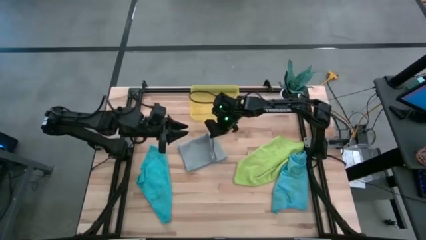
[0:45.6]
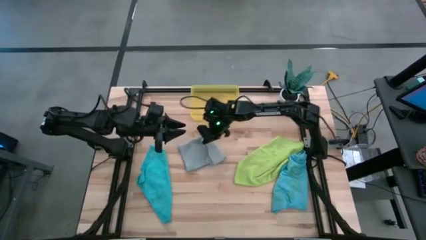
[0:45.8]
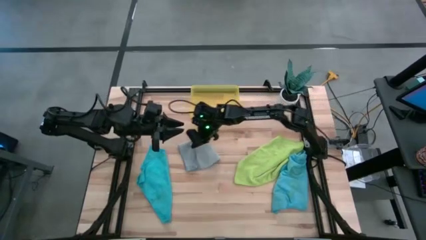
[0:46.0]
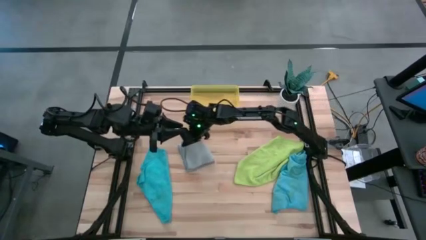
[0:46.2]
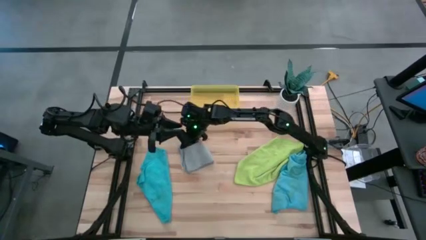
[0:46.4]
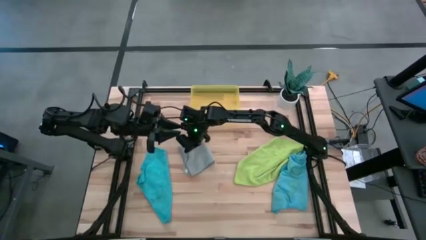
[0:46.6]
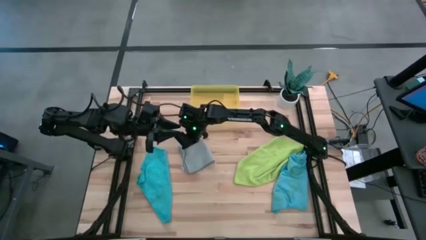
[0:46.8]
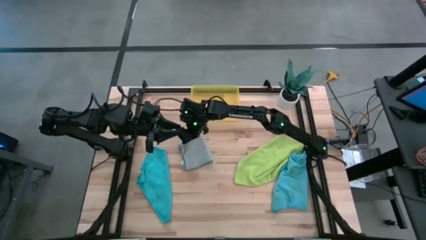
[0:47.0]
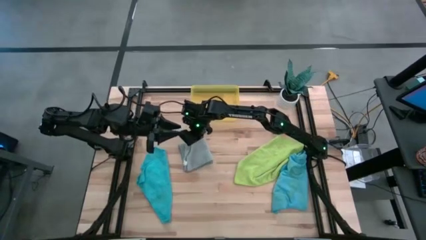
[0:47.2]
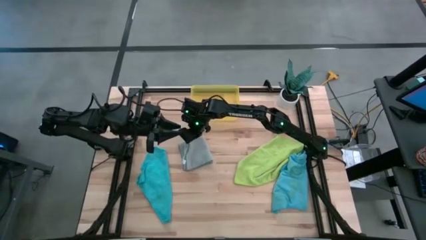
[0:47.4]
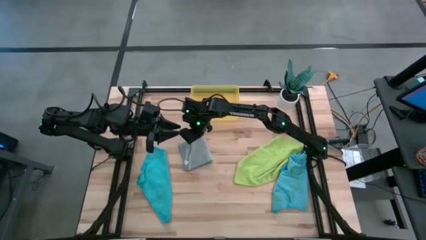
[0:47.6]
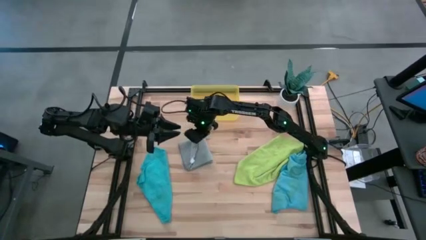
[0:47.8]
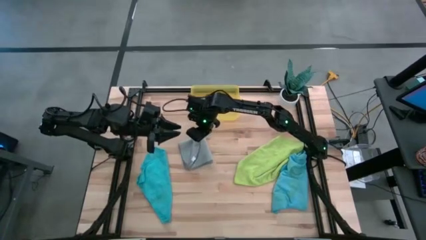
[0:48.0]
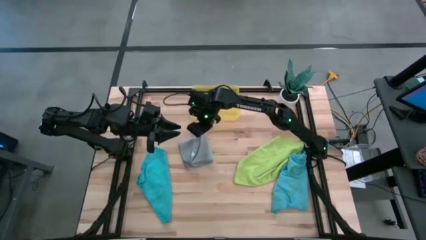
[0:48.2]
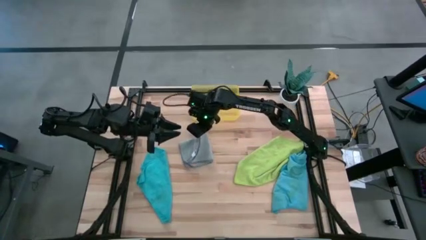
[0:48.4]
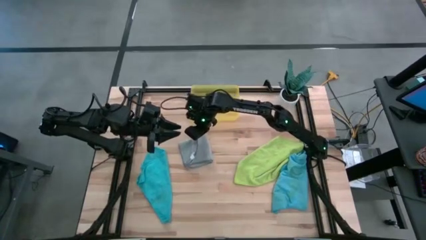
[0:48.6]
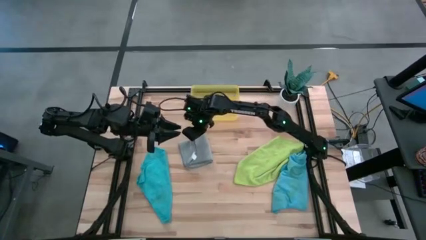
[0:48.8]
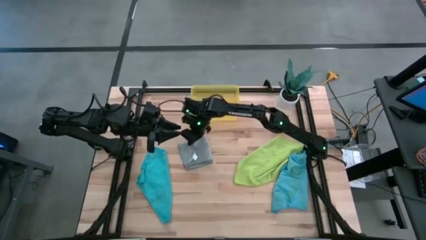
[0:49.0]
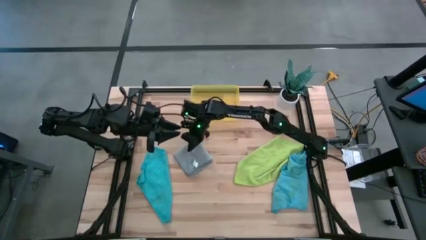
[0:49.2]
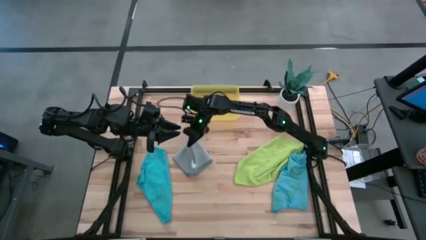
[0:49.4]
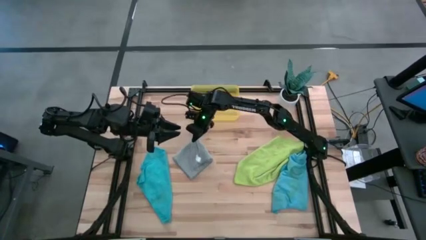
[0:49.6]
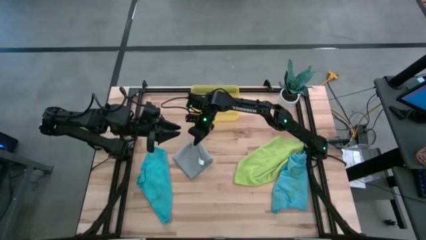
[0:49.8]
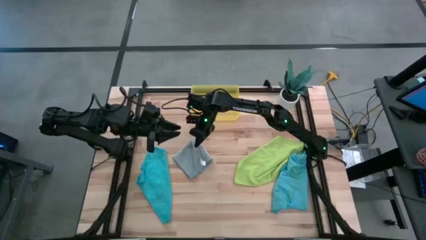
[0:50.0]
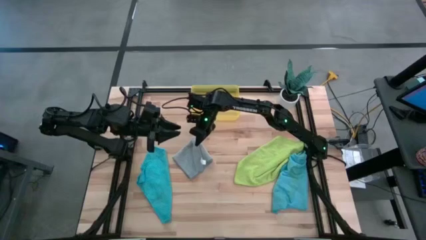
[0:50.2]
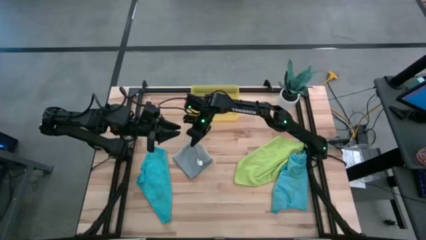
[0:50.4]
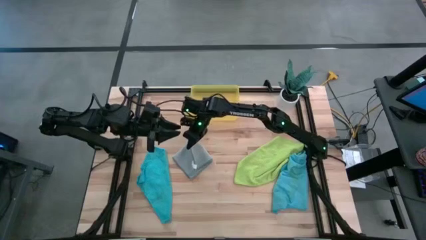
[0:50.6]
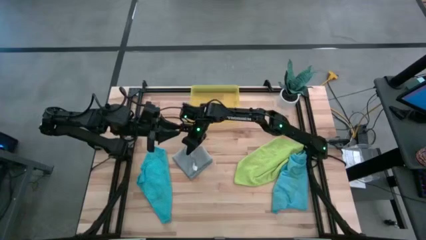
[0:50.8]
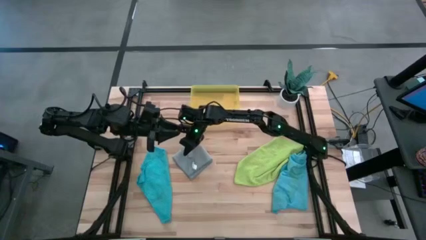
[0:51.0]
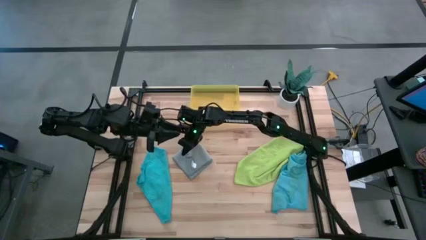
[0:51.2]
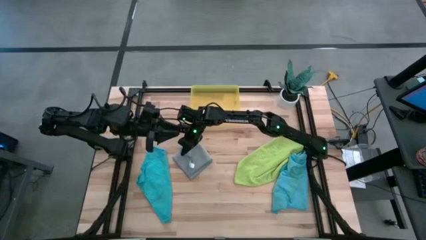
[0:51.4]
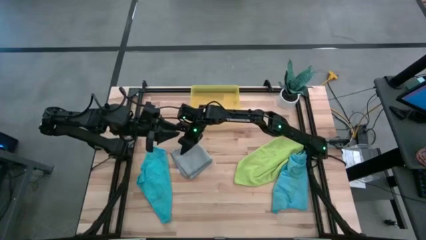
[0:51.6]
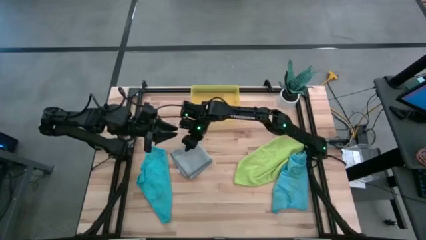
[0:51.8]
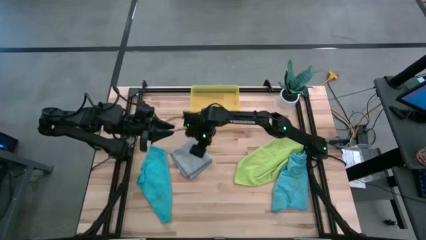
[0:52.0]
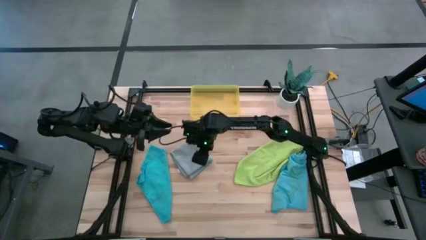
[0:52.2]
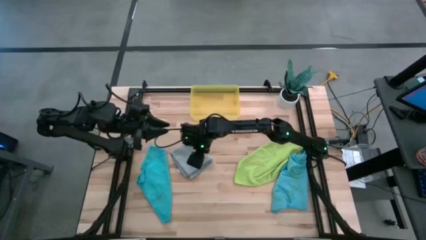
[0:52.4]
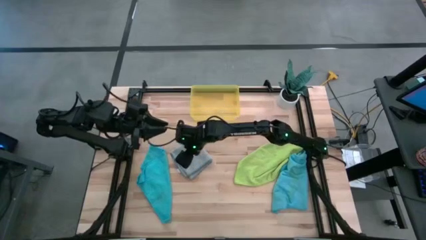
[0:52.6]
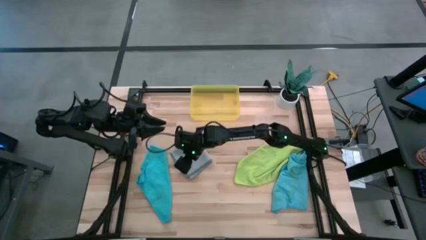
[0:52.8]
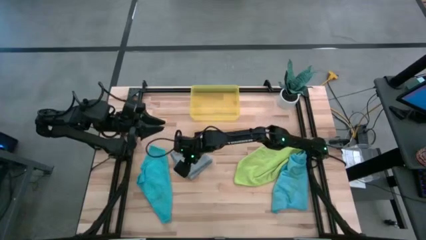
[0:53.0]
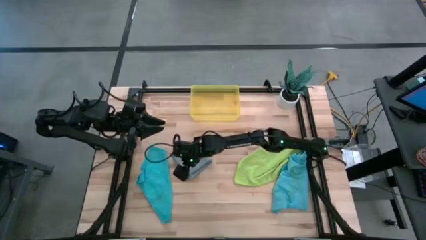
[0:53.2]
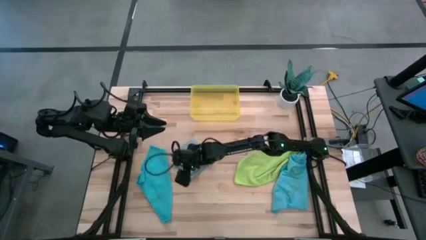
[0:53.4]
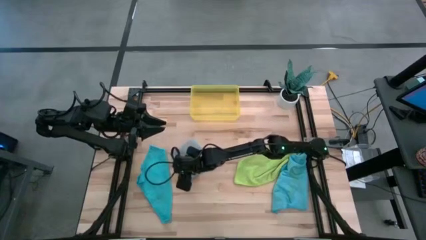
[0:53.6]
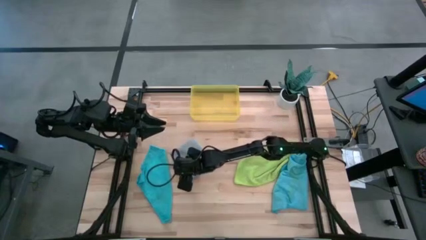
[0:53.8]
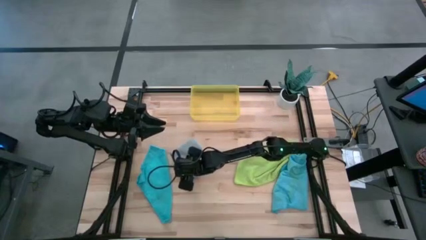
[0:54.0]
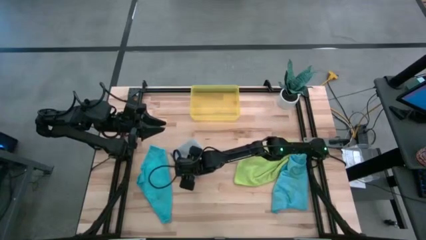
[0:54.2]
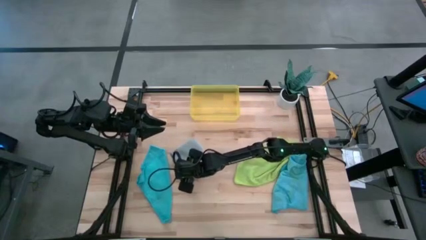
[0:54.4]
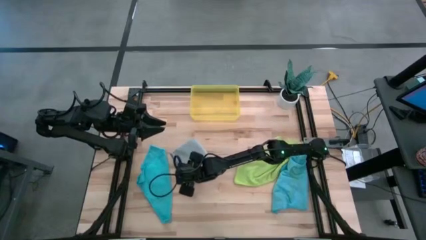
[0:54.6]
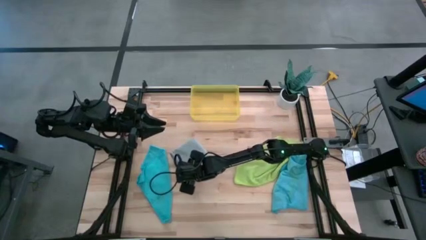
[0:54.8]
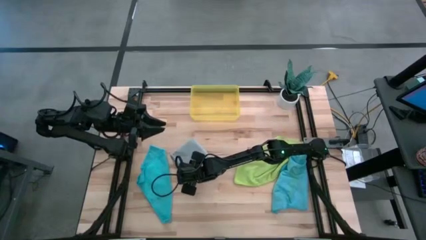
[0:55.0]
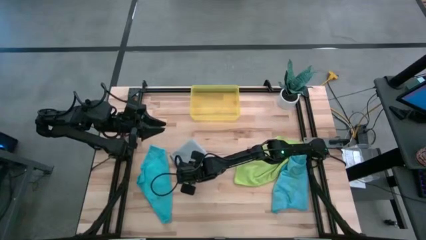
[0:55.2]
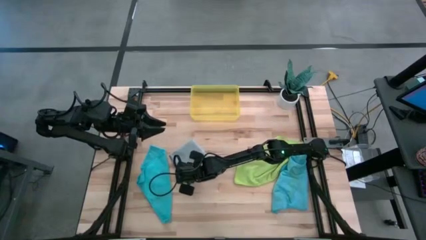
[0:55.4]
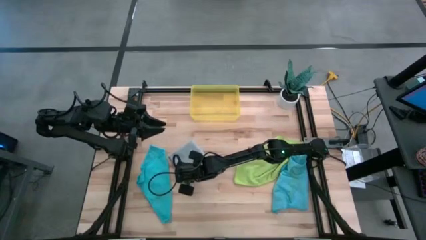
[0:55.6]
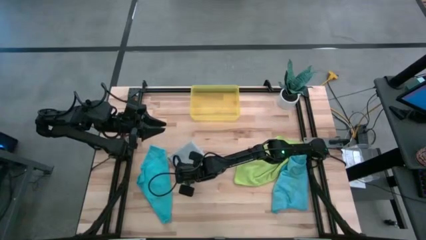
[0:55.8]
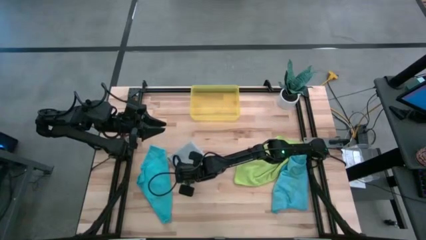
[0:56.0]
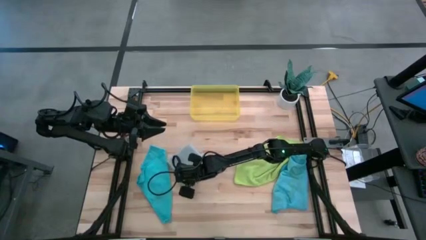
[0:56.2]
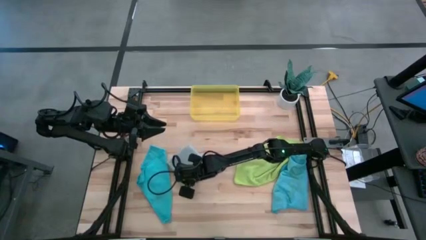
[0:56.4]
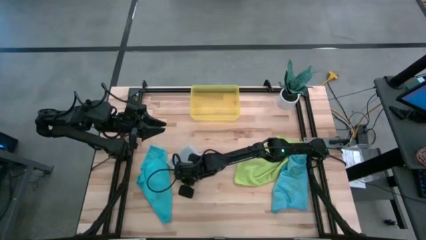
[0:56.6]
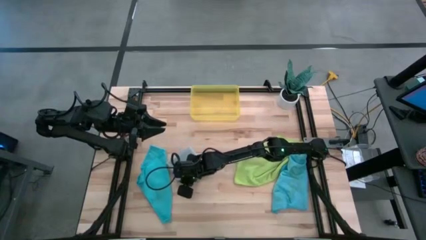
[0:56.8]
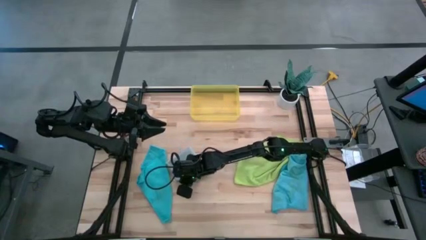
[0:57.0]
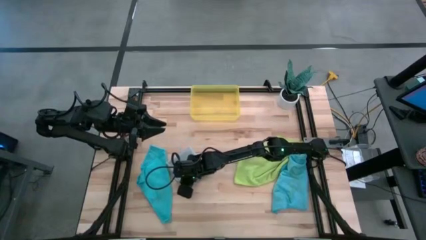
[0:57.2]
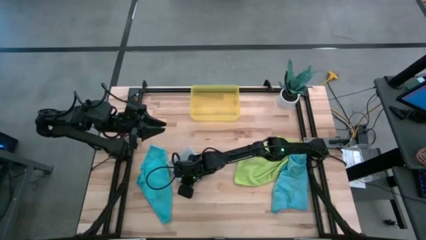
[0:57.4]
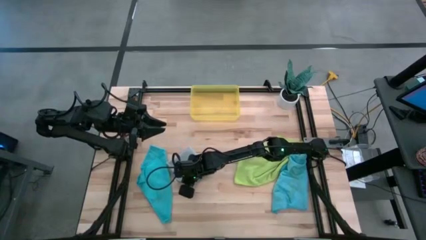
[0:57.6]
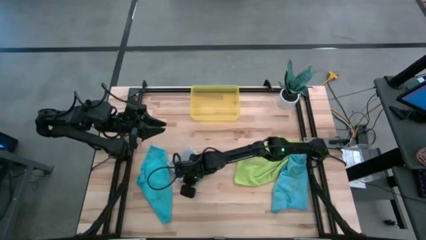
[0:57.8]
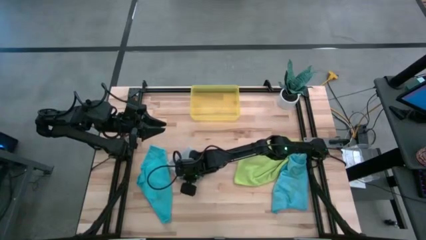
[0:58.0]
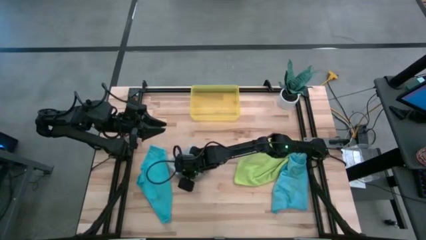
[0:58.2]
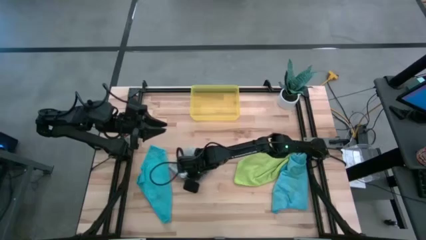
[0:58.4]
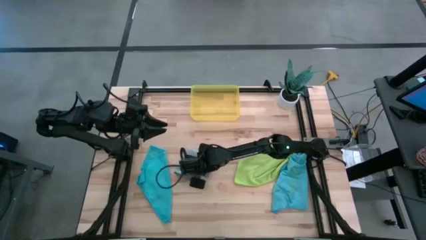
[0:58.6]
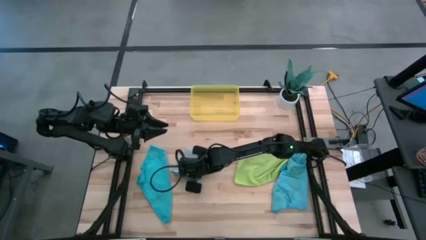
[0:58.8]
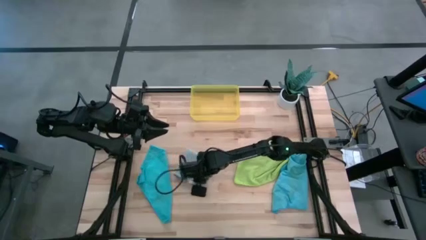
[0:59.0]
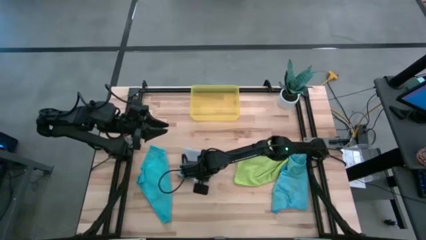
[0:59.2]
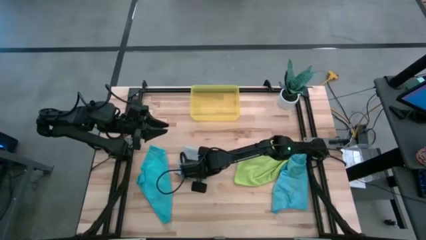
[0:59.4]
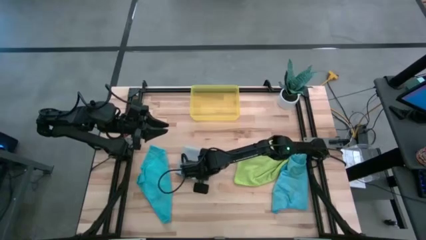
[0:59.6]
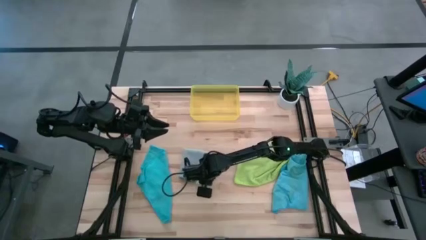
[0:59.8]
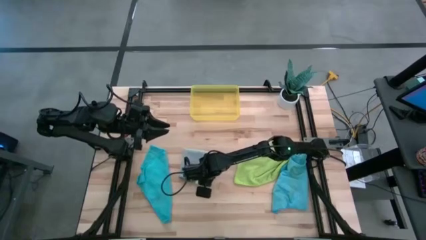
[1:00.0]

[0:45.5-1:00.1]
Task: Fold microfiber towels
Fold the gray microfiber cloth

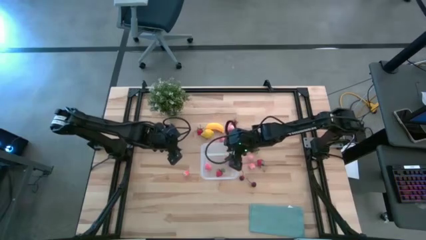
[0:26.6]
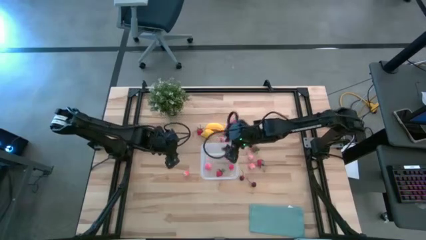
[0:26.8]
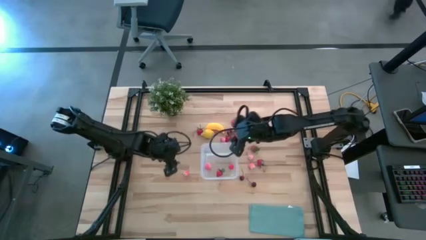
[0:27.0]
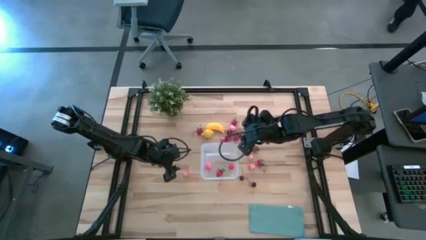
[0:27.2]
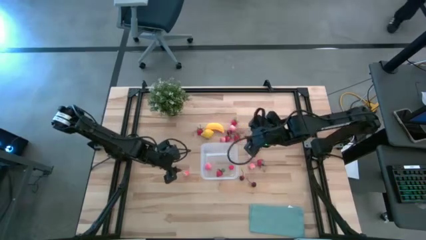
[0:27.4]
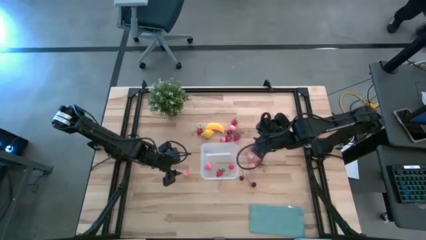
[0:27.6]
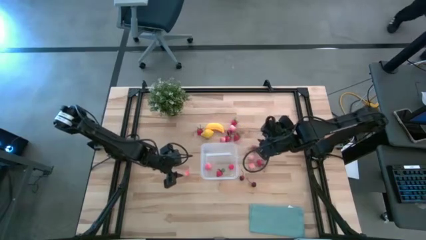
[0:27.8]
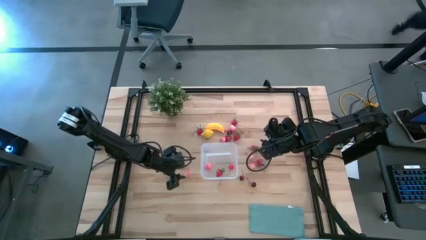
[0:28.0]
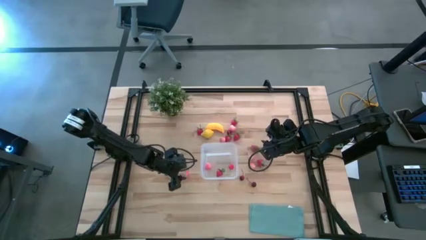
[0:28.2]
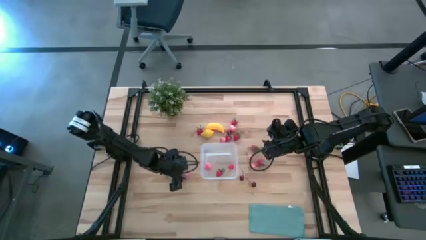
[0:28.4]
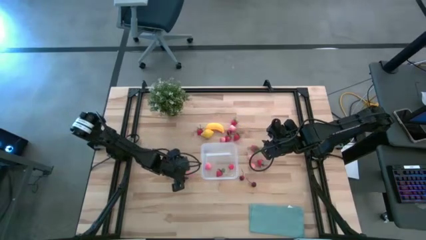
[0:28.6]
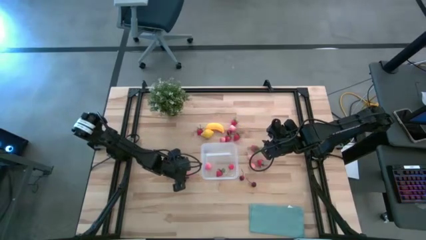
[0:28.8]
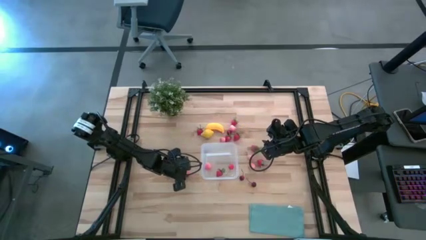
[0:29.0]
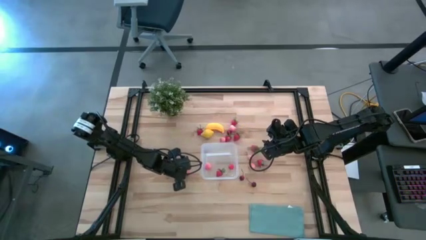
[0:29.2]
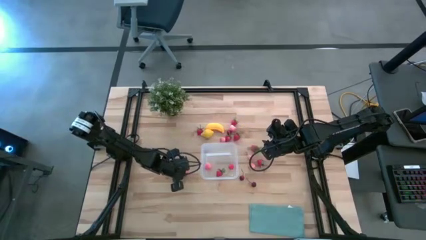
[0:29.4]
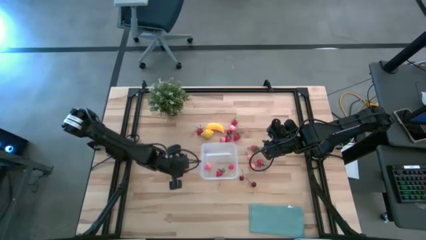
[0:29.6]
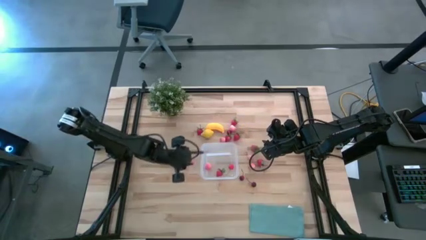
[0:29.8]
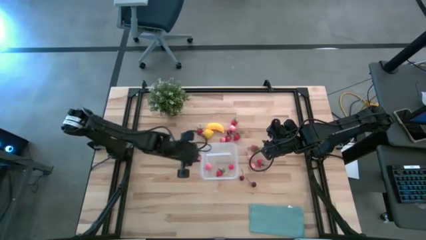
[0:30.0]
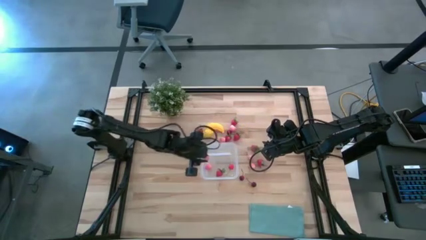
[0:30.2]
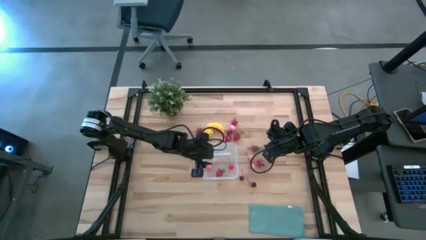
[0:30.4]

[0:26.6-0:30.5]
Task: Pick and placing Produce into tupperware
Put the pink peach into the transparent container
